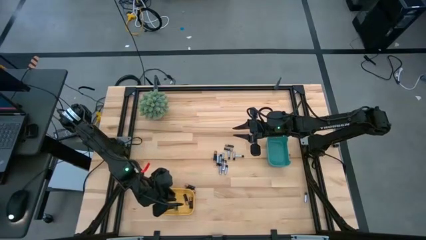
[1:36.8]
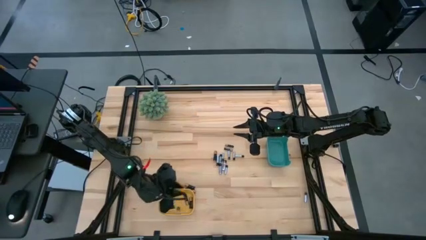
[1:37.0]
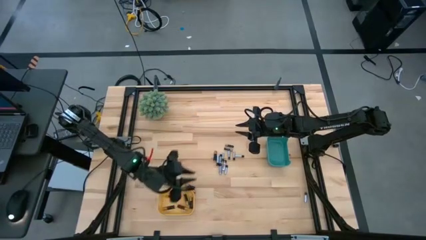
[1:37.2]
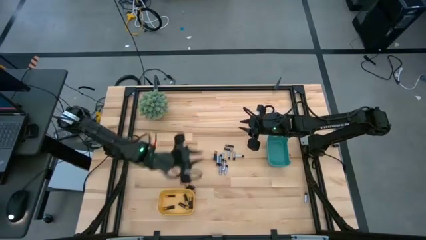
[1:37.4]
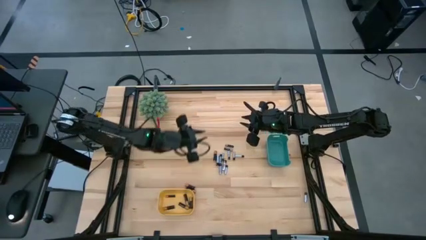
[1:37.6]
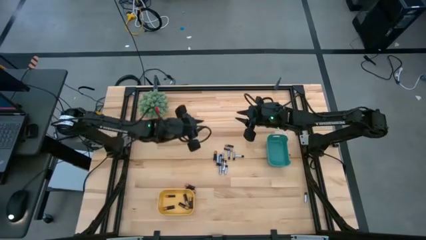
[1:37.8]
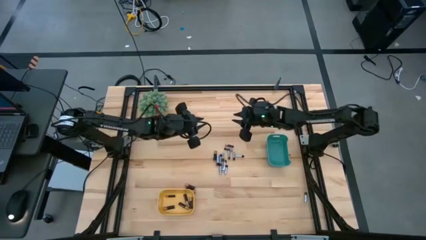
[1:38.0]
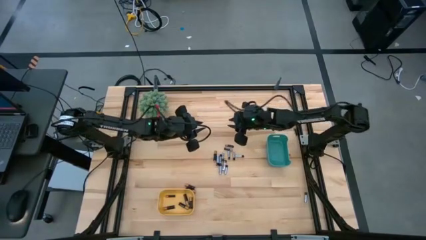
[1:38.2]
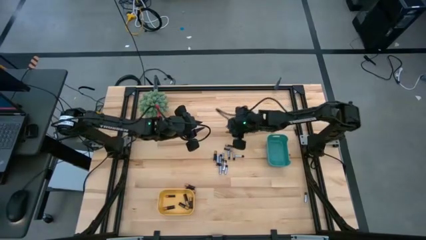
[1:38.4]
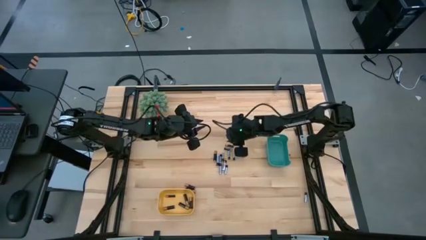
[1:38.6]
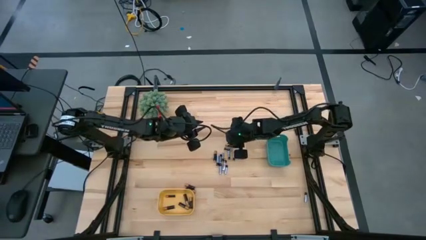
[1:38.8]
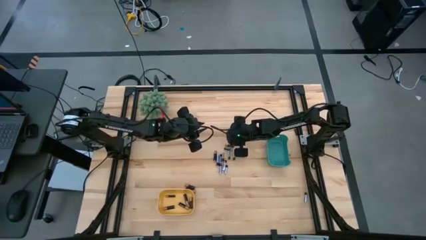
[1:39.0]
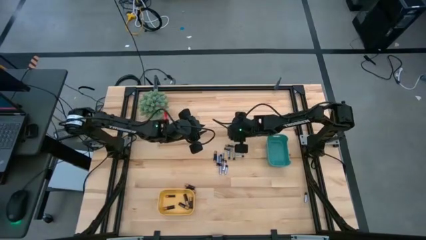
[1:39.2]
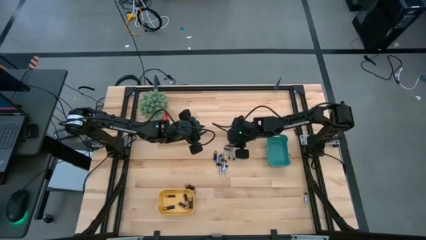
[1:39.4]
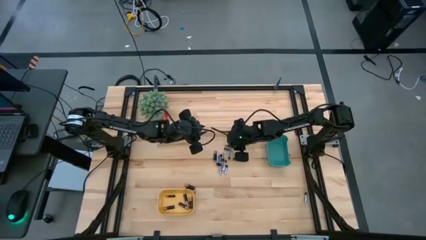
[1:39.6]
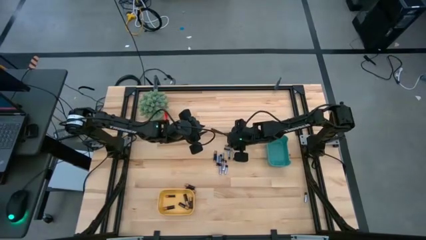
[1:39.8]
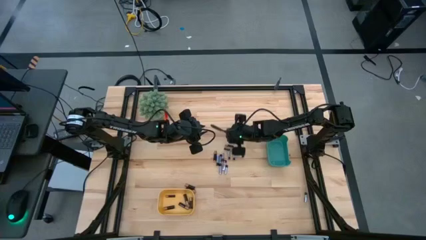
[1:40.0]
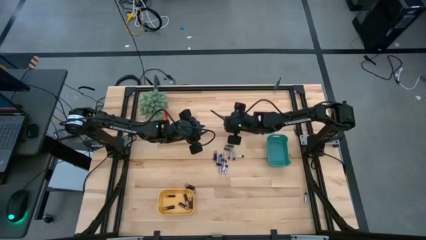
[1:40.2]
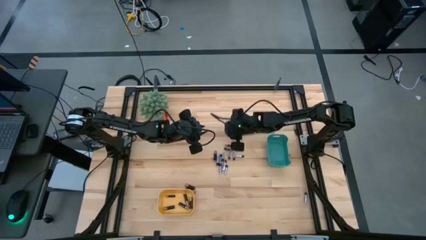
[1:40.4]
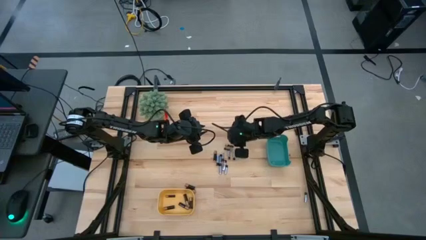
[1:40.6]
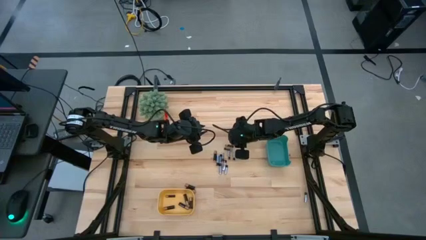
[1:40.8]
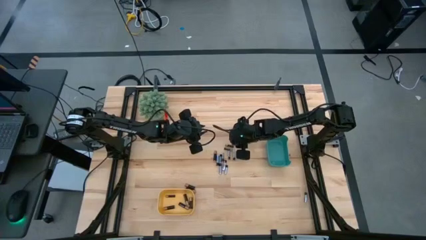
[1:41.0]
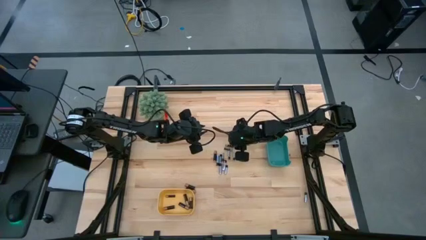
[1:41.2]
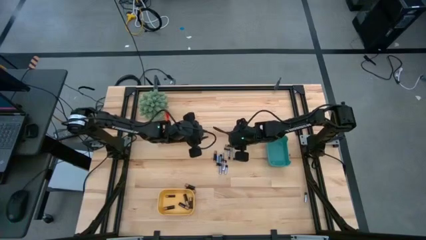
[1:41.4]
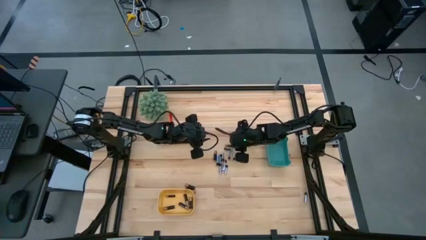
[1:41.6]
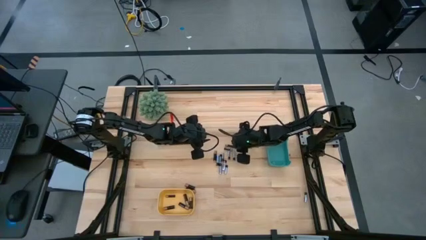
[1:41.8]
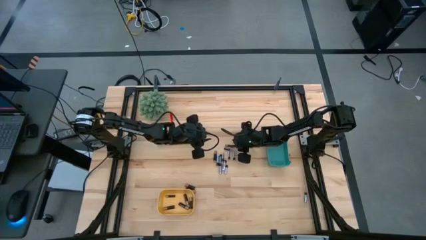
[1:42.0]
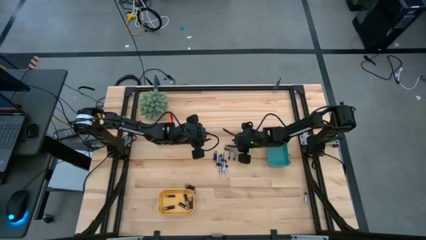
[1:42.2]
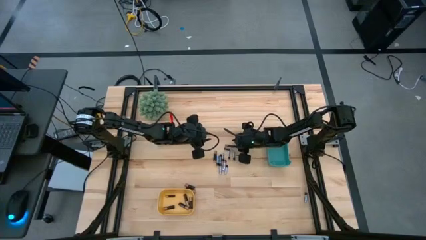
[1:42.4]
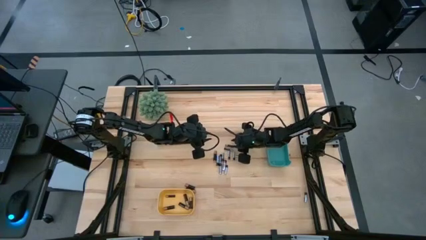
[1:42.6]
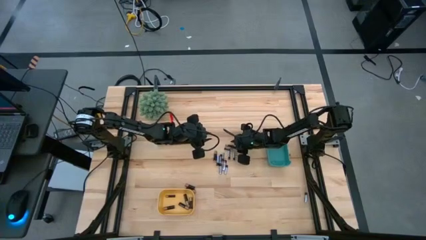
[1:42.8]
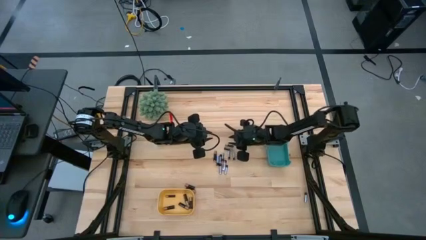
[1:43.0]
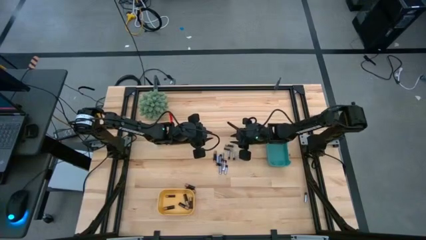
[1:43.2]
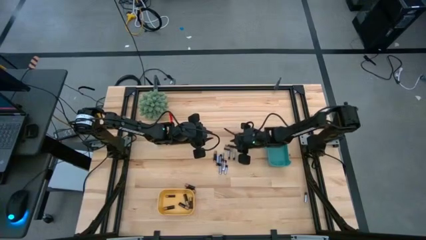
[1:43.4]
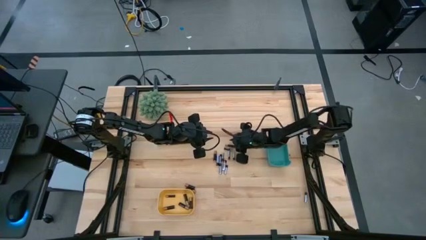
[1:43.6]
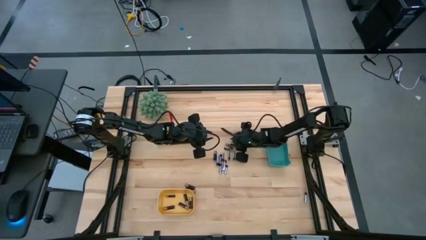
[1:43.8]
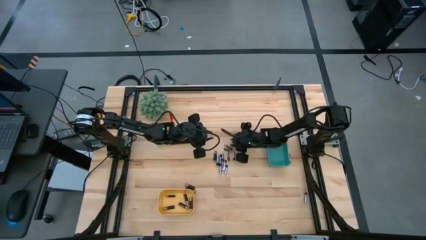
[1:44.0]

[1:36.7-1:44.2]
Task: Sort batteries
Put the black battery into the yellow bin

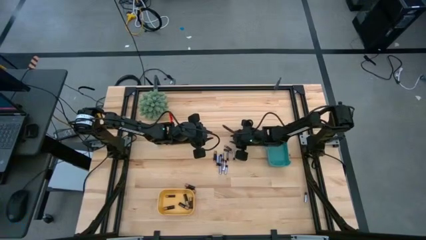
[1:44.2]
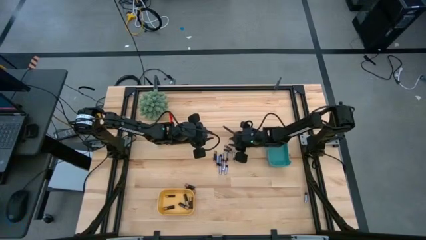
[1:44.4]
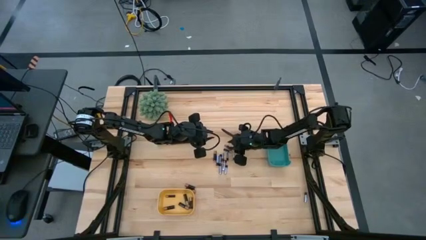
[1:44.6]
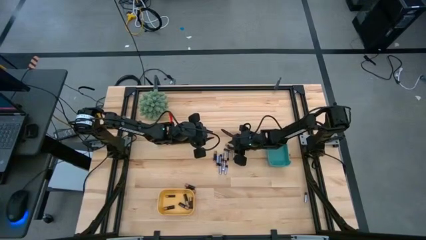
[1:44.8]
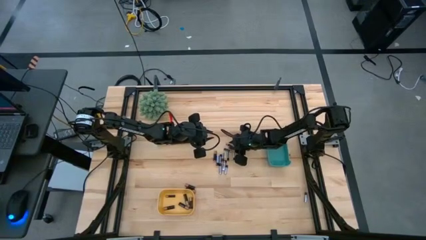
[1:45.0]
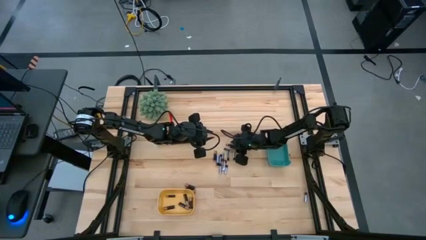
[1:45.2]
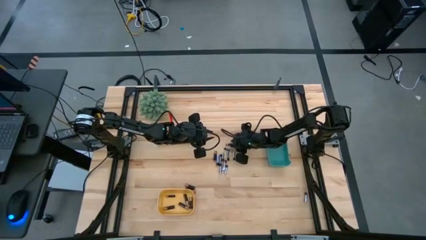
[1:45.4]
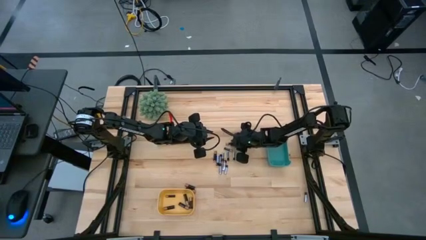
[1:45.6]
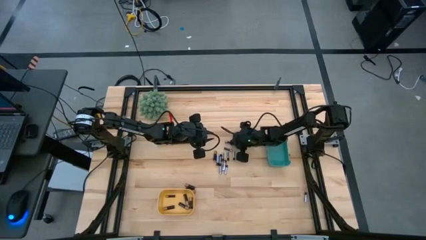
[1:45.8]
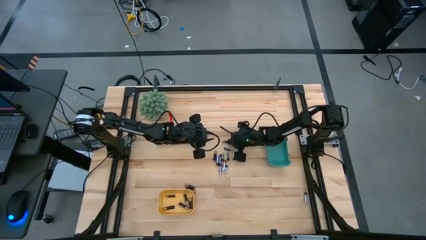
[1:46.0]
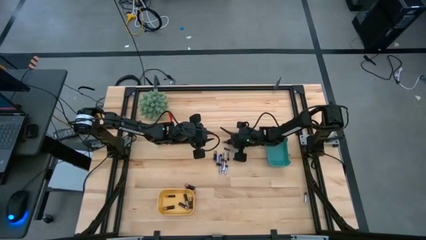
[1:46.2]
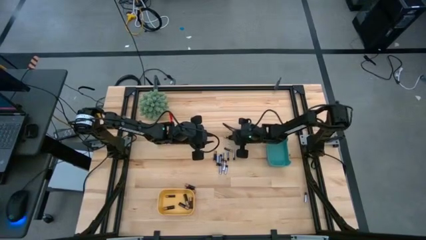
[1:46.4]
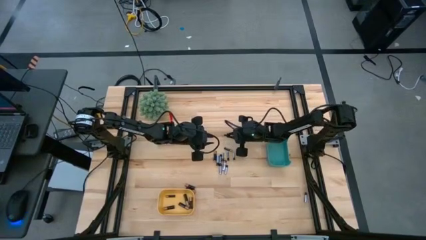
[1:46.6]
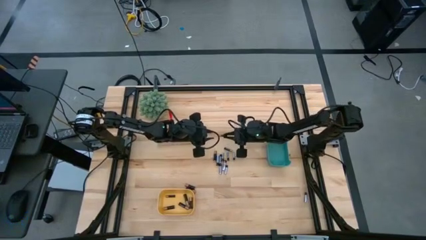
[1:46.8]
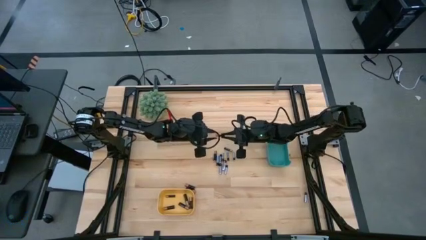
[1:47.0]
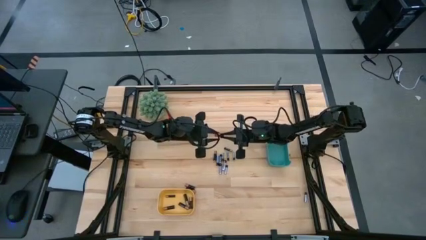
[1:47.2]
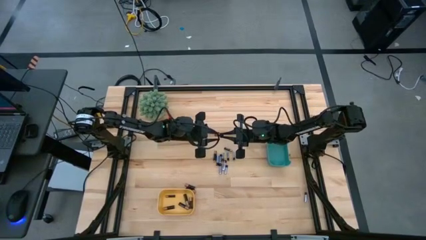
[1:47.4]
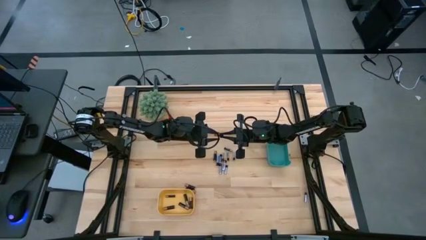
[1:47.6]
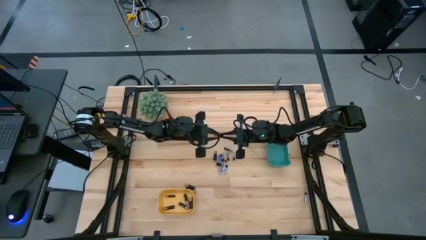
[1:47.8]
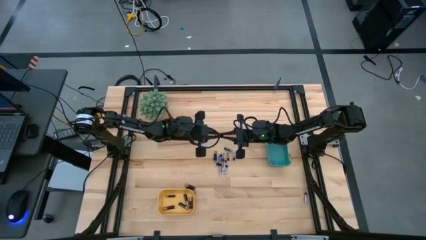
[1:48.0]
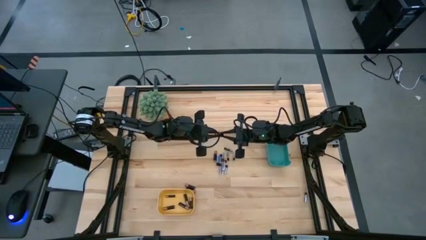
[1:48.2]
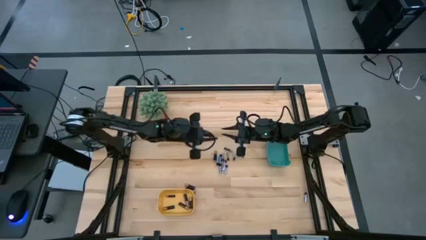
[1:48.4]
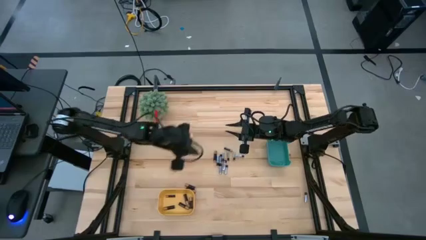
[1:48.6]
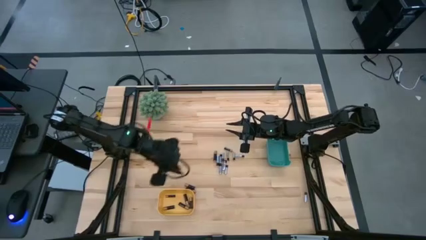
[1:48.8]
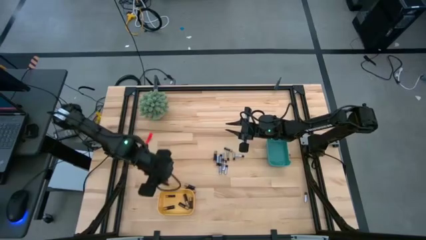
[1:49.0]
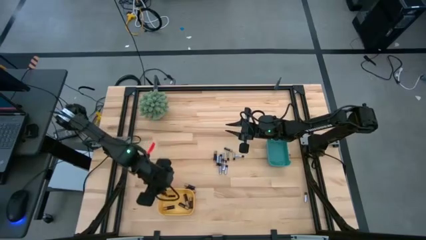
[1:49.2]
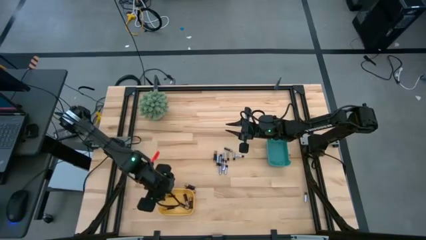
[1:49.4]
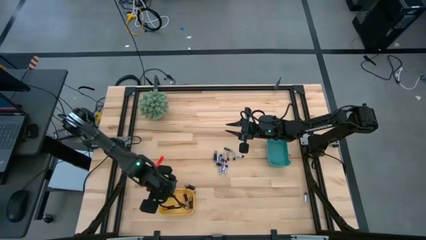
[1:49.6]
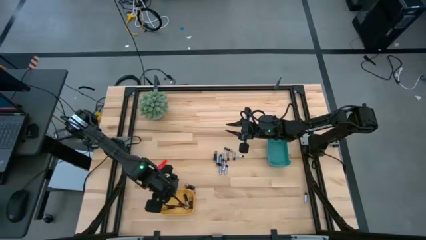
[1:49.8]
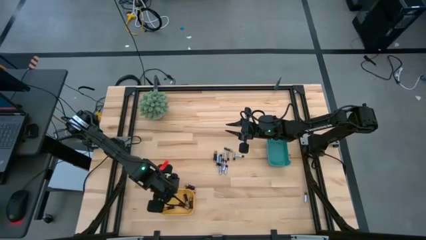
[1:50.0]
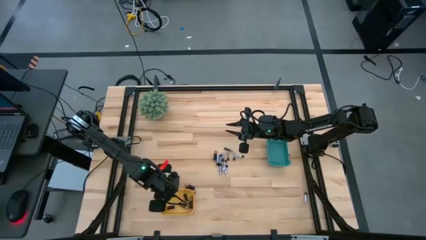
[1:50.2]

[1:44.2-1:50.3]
Put the black battery into the yellow bin
